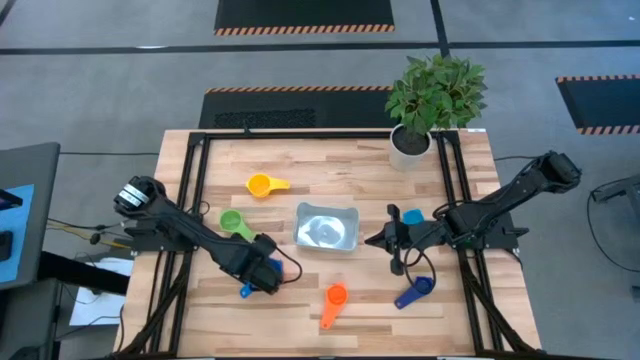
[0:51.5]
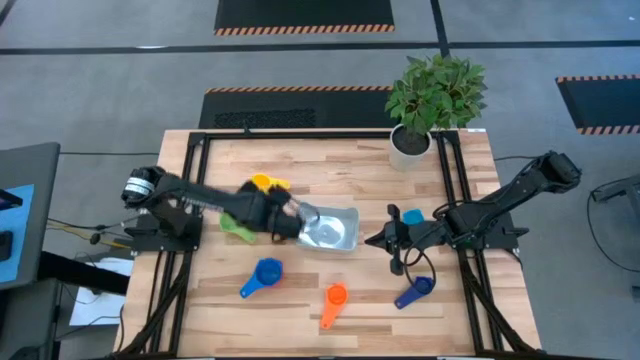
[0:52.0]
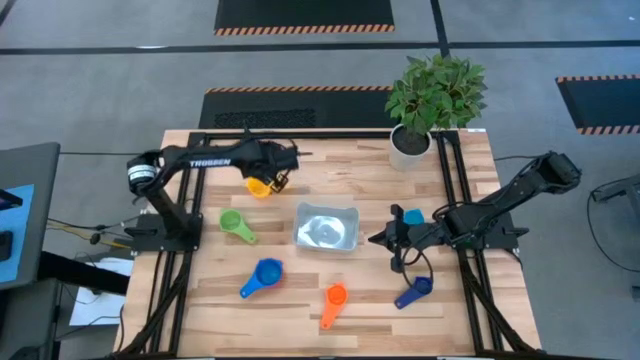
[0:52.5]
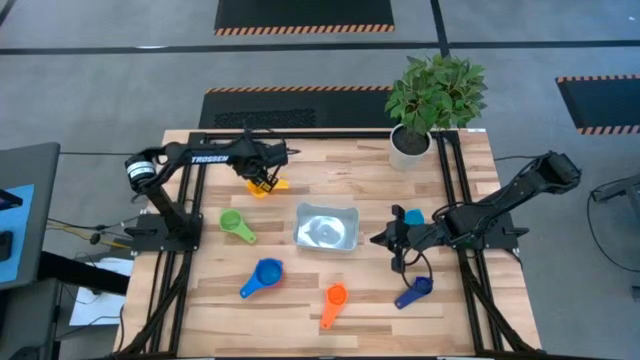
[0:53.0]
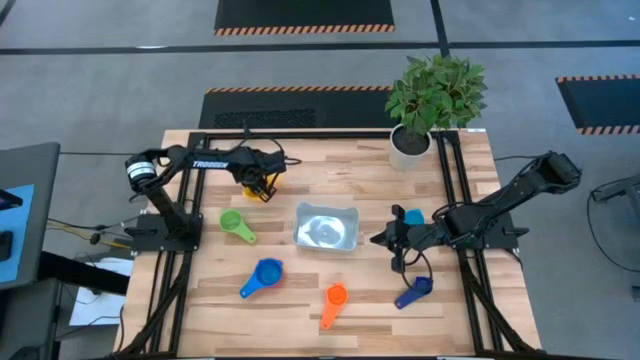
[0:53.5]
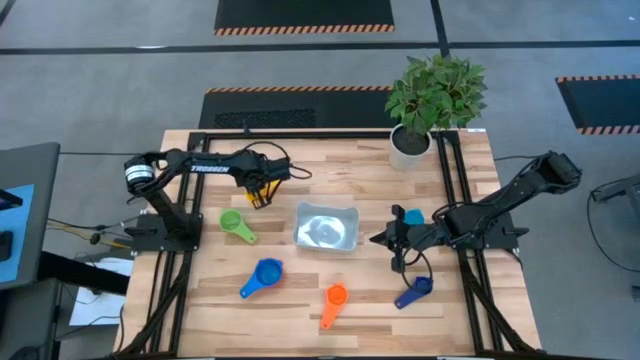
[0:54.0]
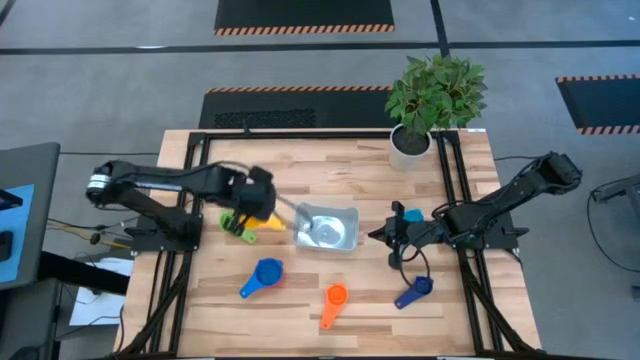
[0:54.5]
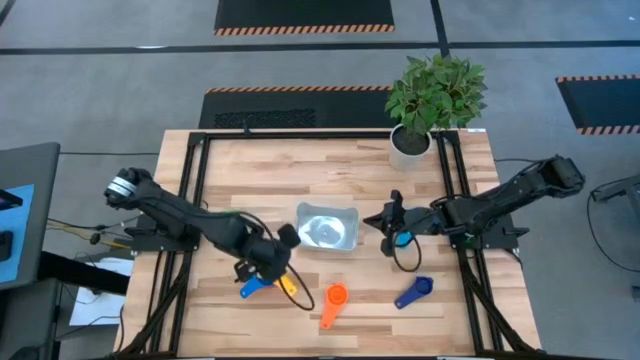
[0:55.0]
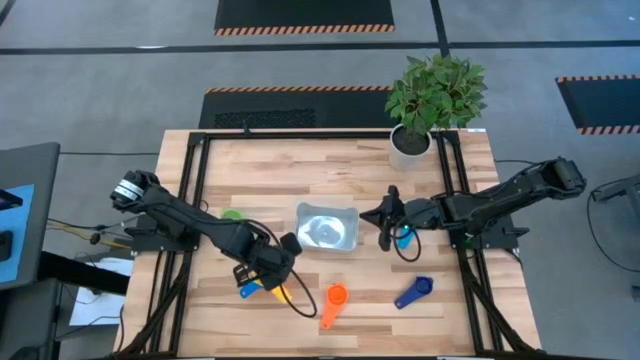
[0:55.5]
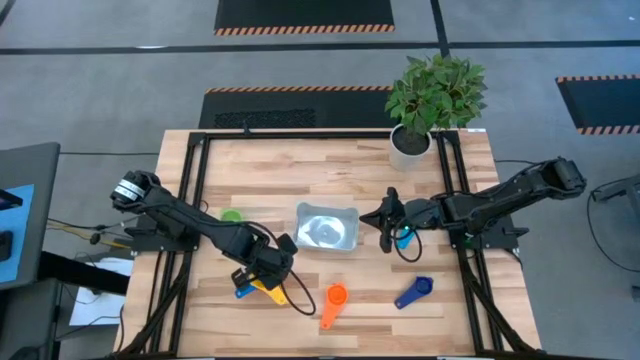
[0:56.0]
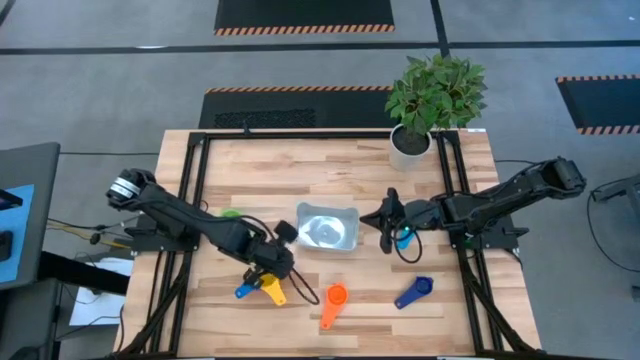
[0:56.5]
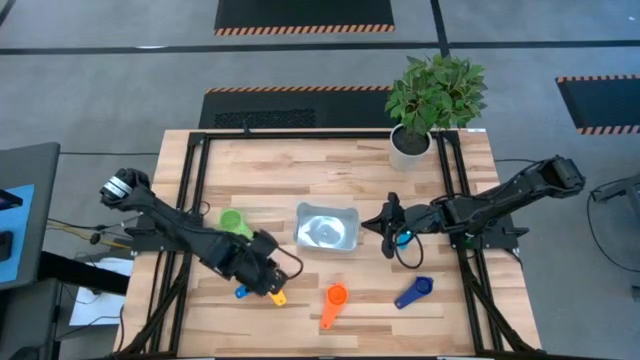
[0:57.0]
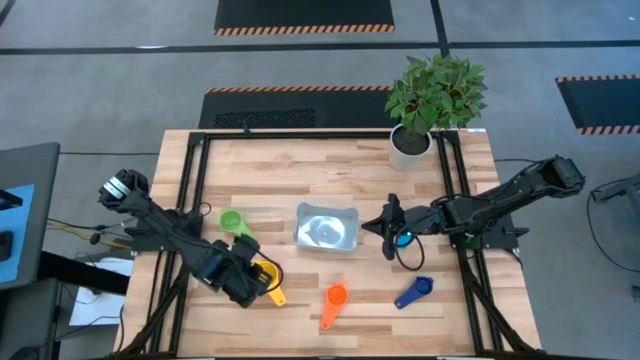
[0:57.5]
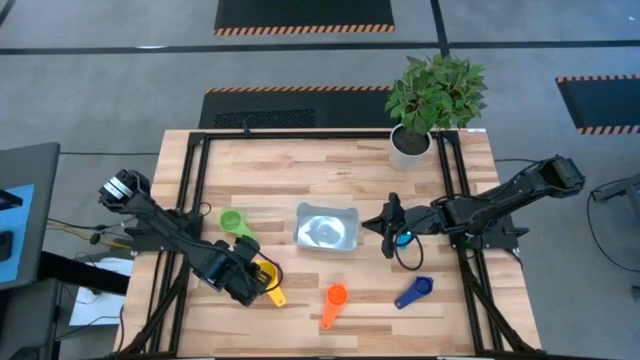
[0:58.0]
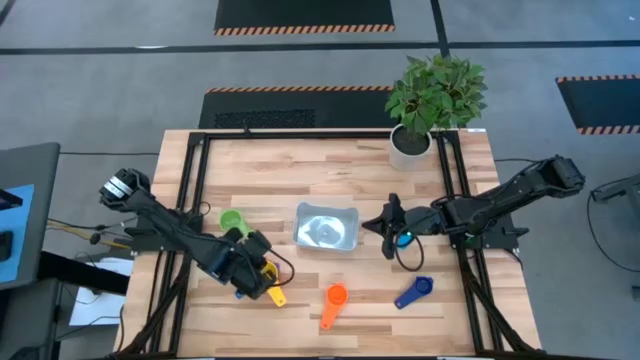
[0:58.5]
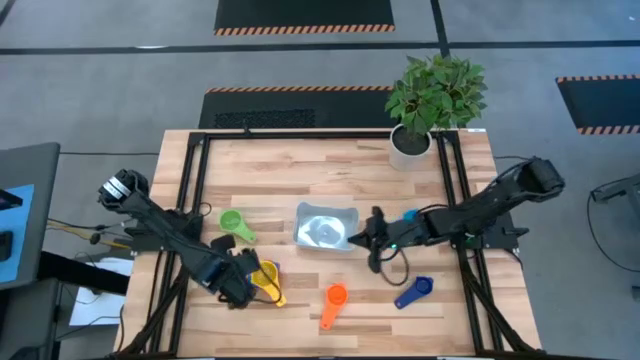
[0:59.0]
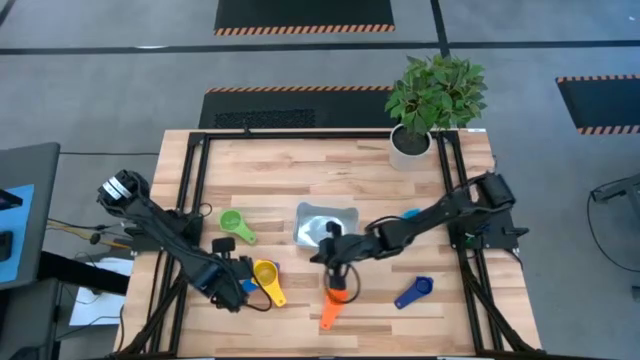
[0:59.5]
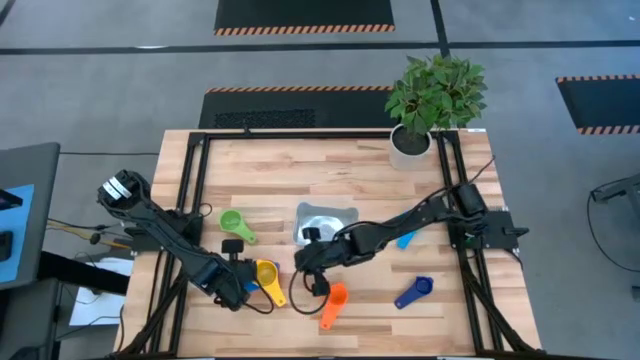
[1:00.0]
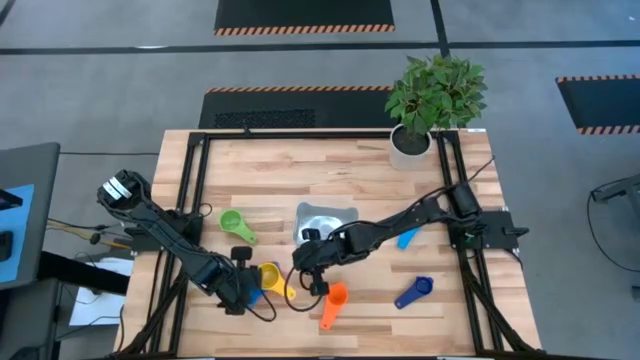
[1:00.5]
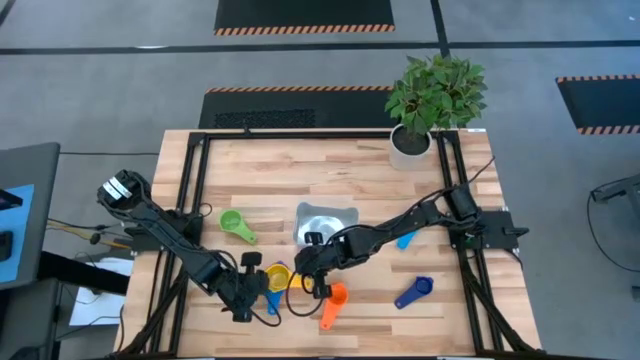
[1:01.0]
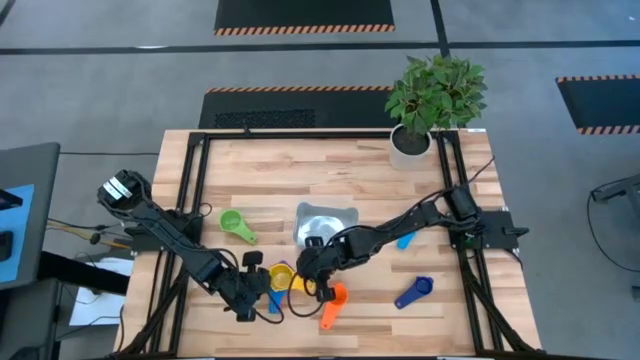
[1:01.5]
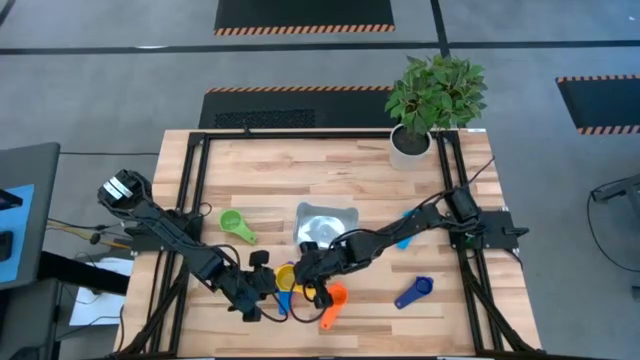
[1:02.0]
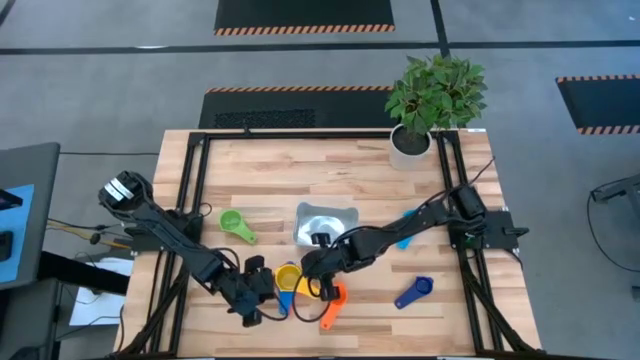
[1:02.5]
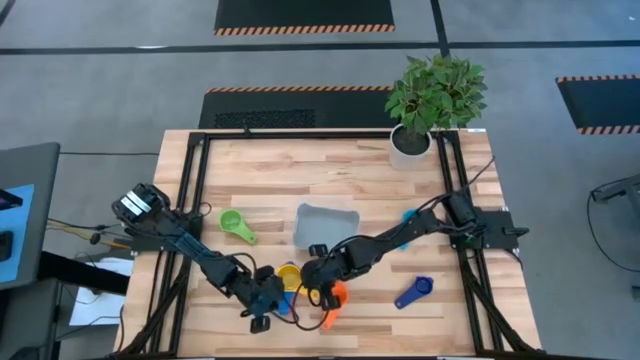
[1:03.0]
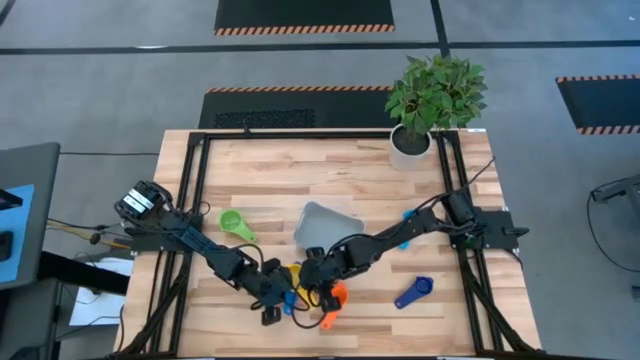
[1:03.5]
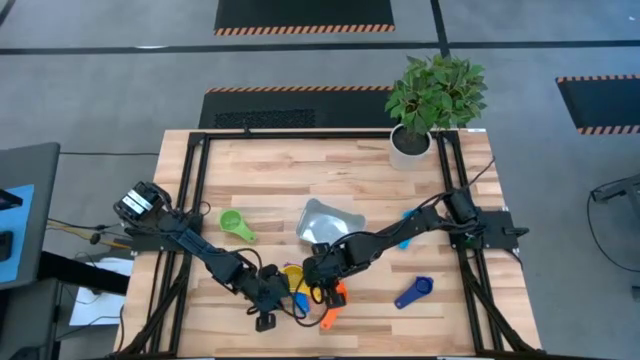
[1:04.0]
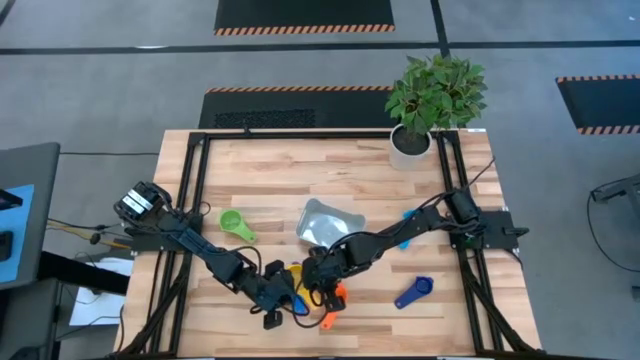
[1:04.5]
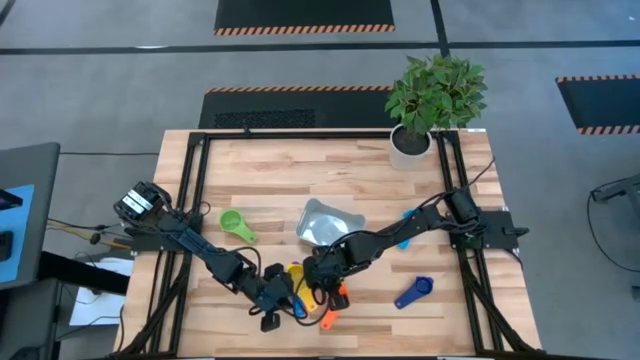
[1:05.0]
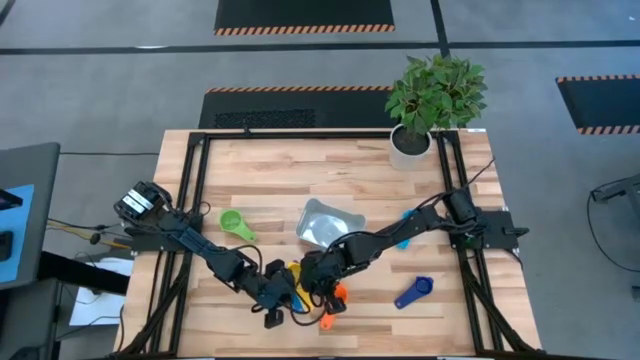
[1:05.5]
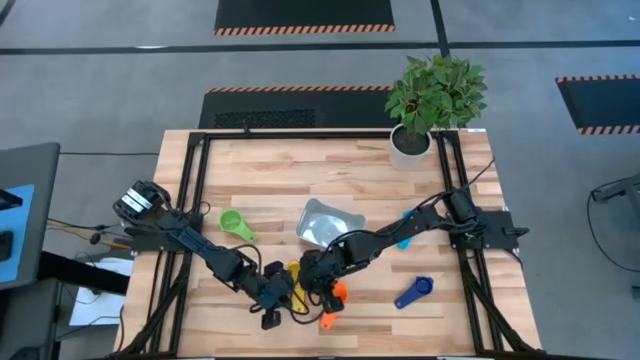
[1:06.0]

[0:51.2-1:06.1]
Task: Nest measuring cups in basket
Stack the yellow measuring cup on top of the blue measuring cup

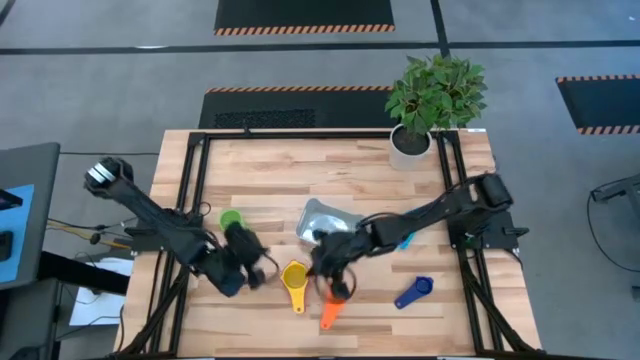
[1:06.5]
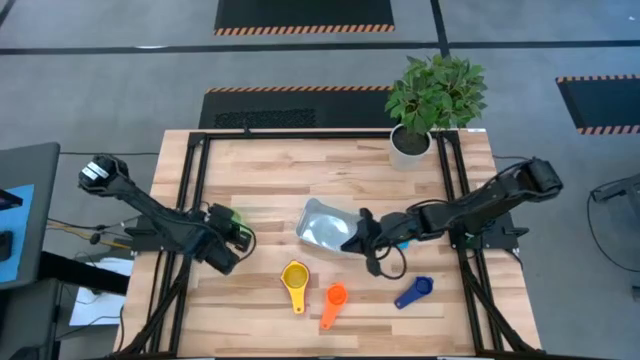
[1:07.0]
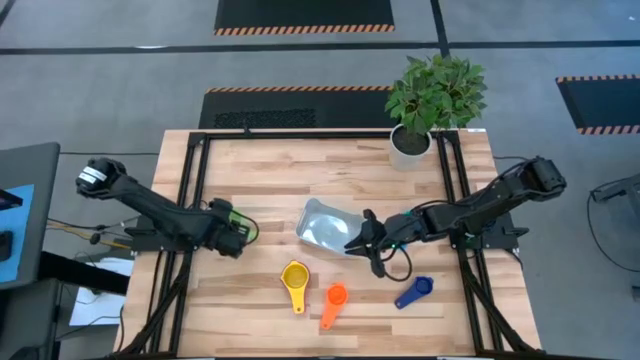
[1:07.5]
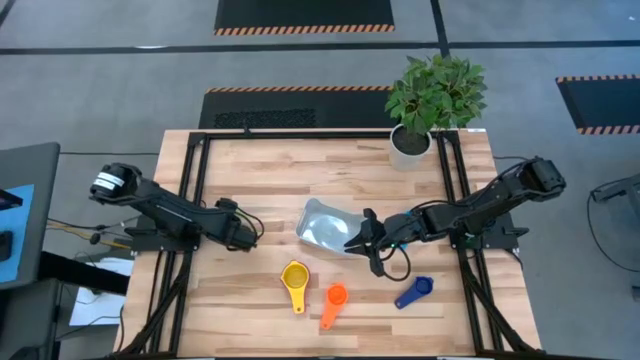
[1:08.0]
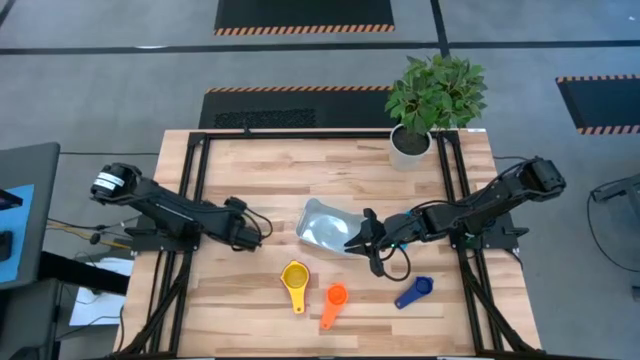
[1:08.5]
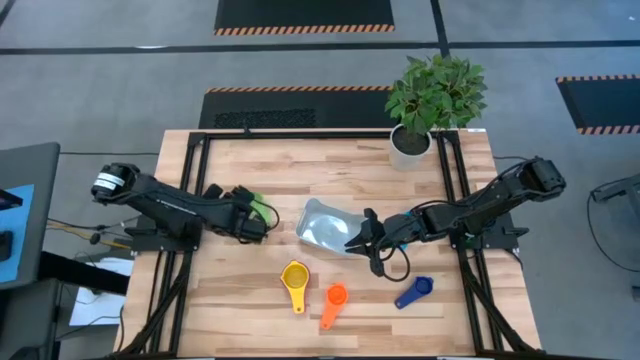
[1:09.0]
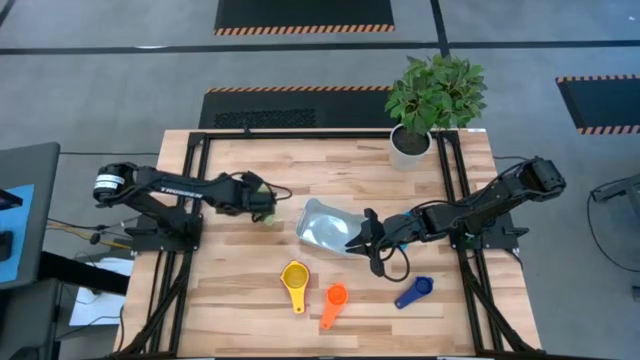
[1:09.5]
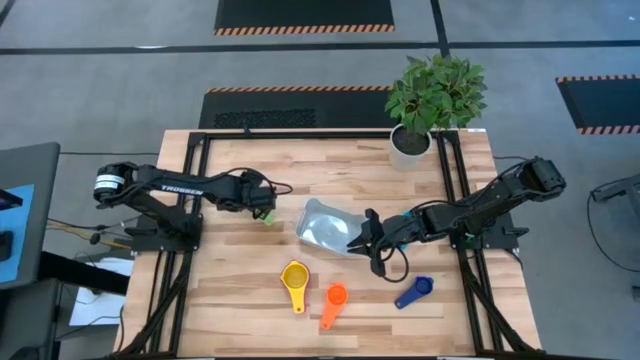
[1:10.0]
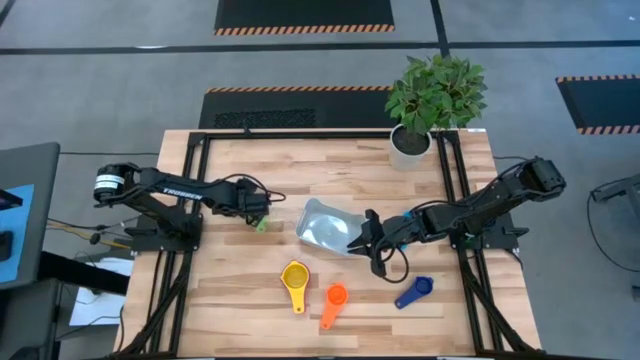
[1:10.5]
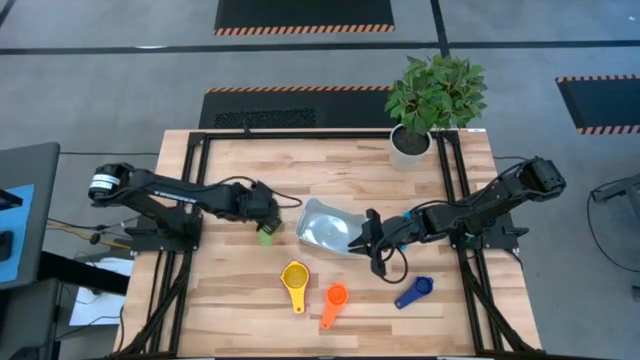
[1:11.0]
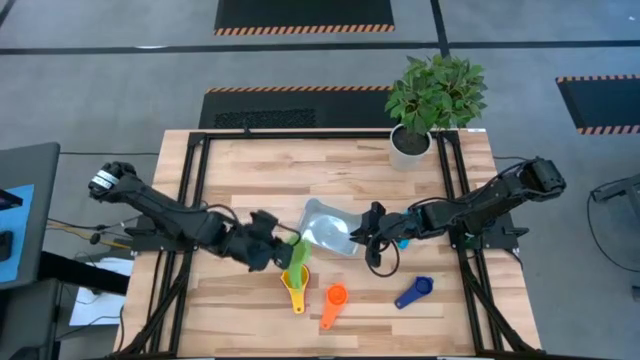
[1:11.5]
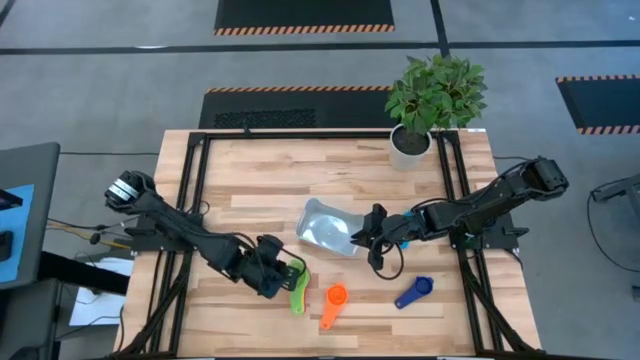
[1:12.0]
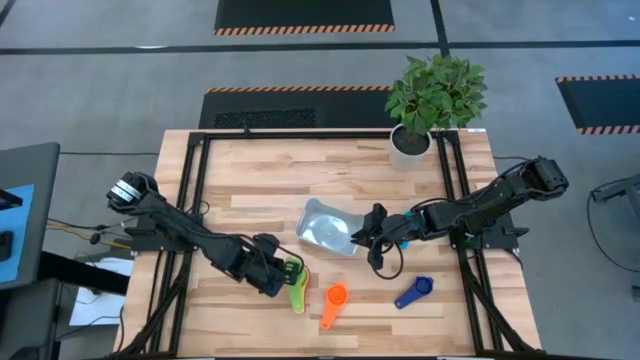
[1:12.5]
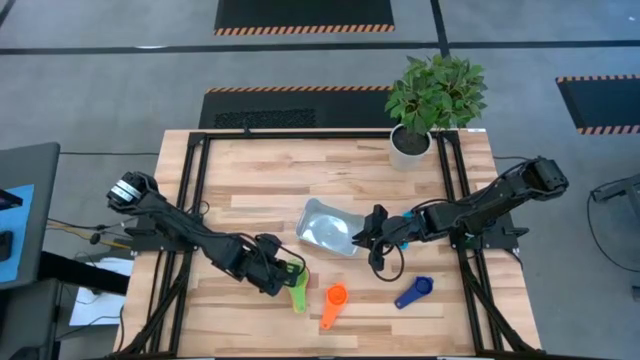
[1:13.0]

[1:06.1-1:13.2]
Stack the green measuring cup on top of the yellow measuring cup
